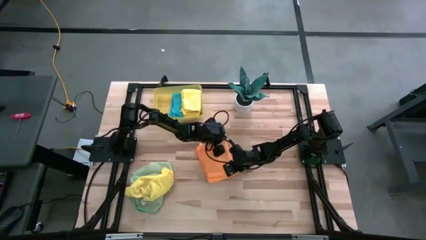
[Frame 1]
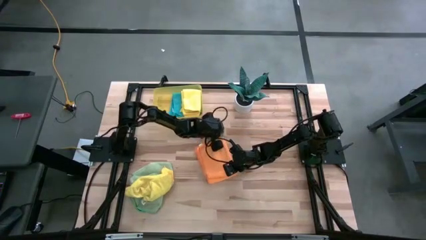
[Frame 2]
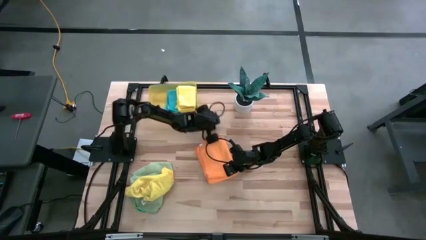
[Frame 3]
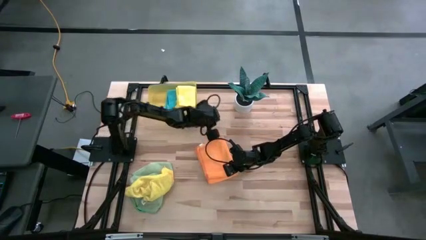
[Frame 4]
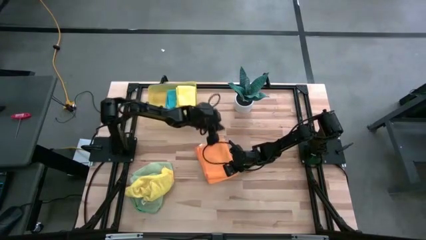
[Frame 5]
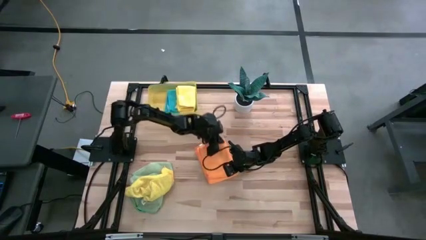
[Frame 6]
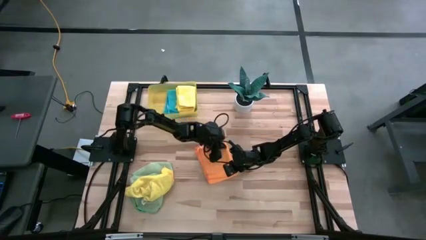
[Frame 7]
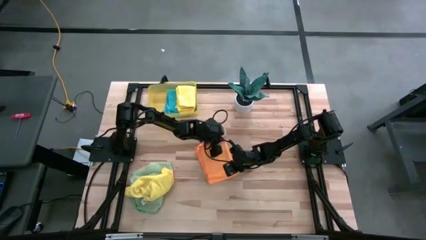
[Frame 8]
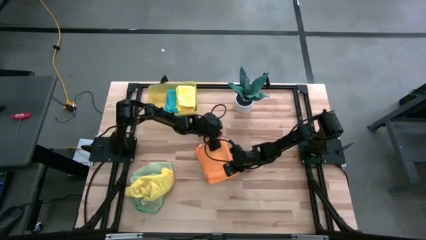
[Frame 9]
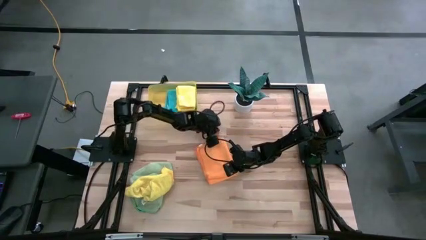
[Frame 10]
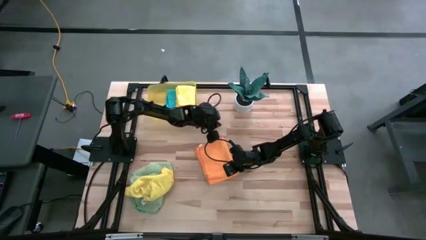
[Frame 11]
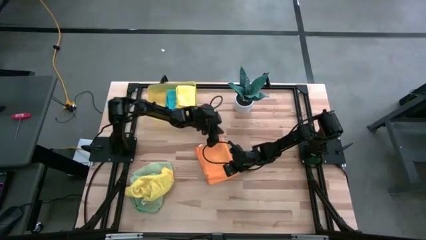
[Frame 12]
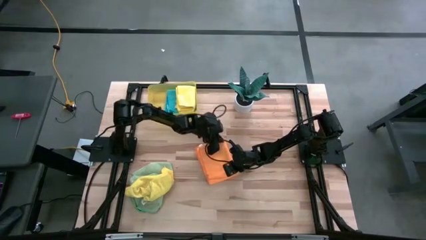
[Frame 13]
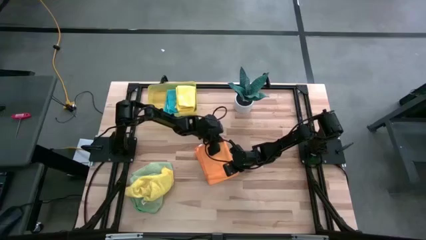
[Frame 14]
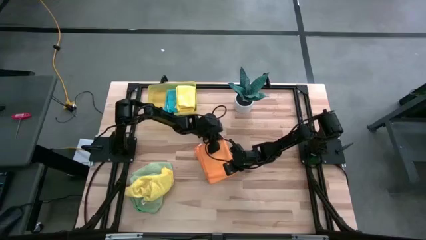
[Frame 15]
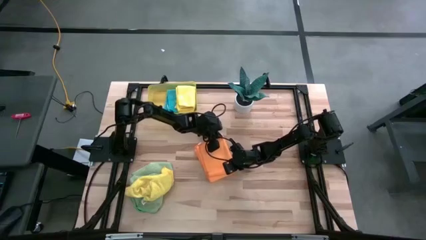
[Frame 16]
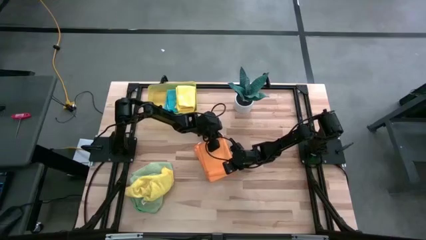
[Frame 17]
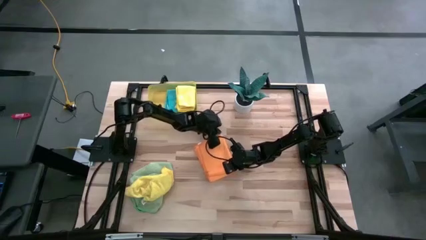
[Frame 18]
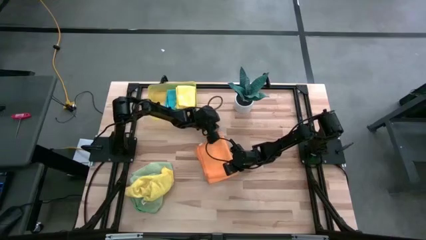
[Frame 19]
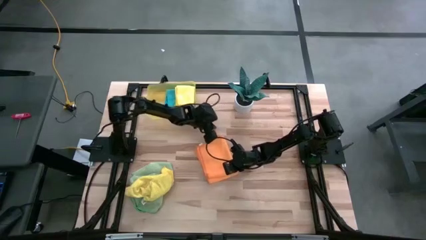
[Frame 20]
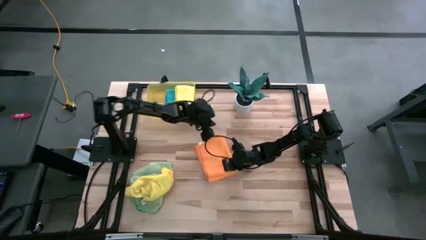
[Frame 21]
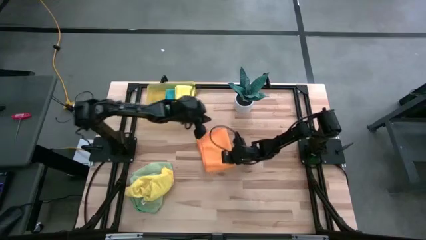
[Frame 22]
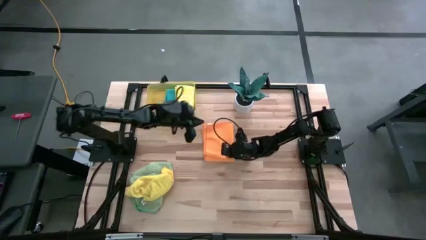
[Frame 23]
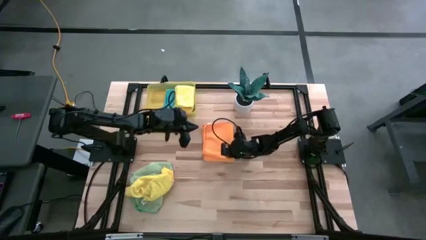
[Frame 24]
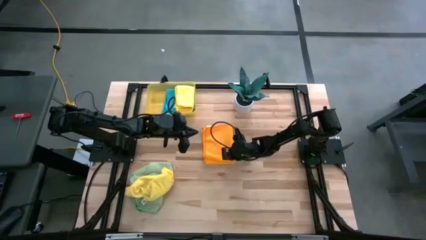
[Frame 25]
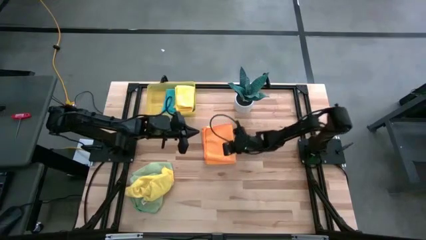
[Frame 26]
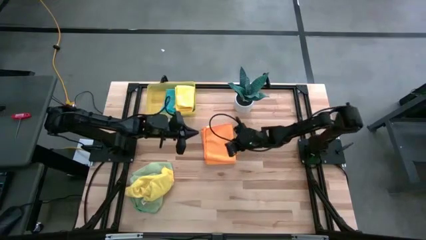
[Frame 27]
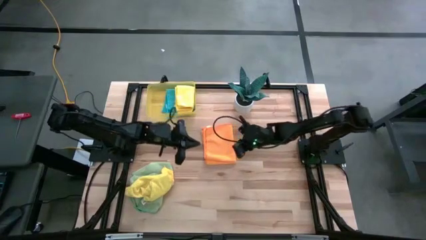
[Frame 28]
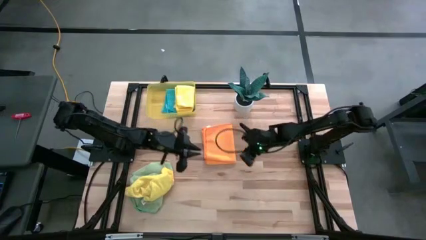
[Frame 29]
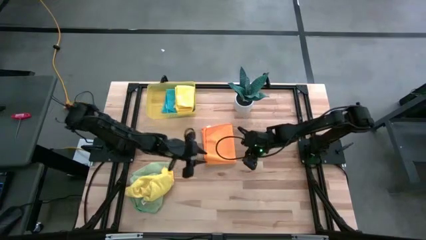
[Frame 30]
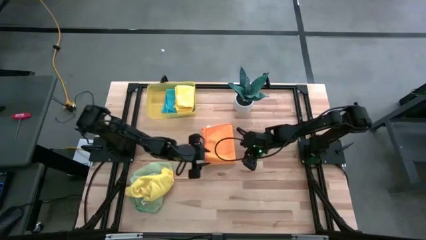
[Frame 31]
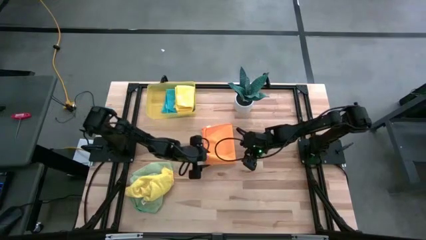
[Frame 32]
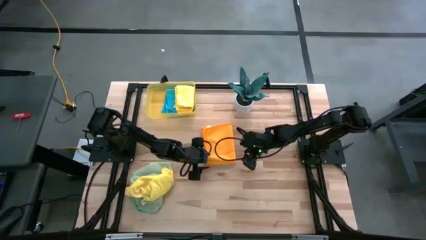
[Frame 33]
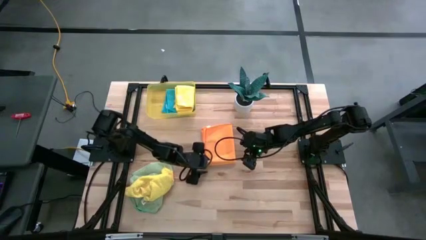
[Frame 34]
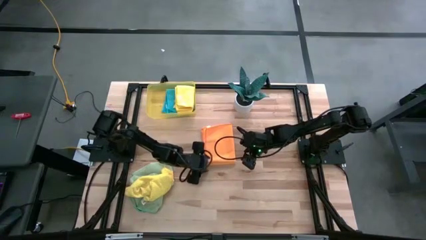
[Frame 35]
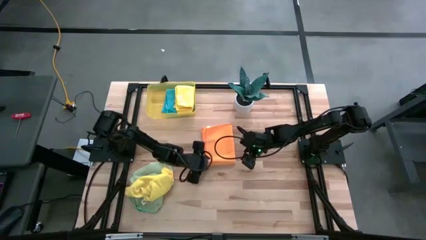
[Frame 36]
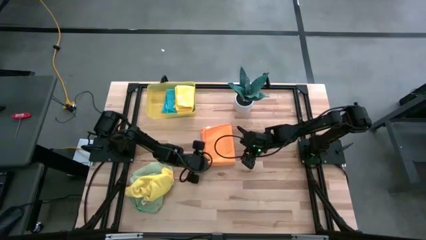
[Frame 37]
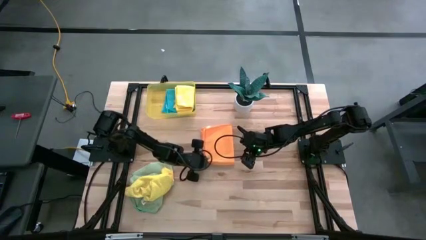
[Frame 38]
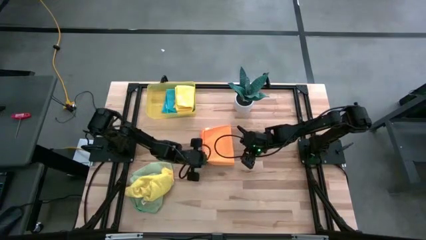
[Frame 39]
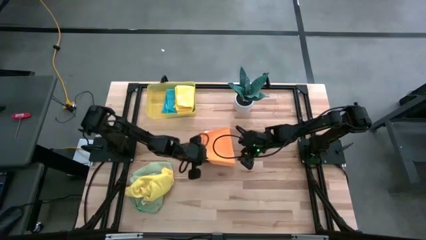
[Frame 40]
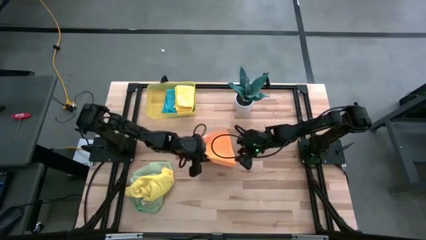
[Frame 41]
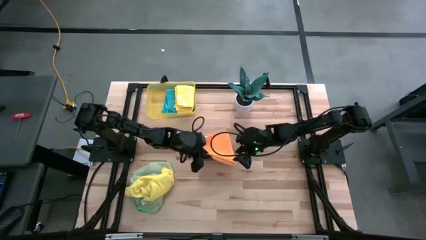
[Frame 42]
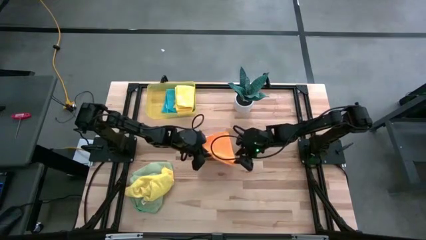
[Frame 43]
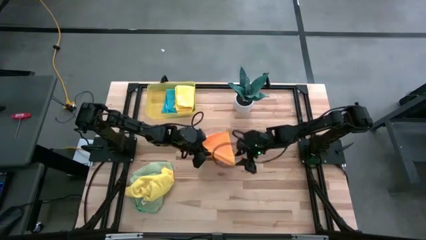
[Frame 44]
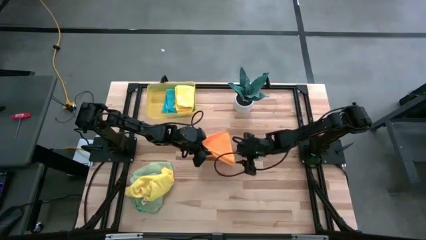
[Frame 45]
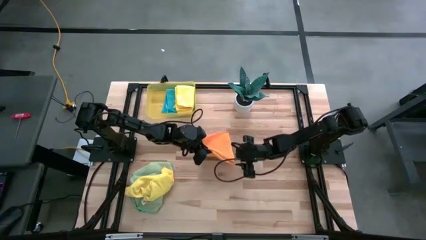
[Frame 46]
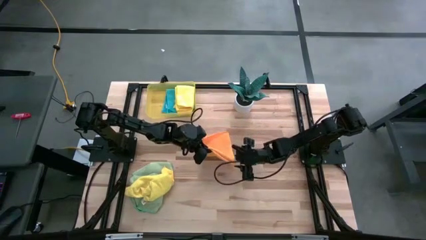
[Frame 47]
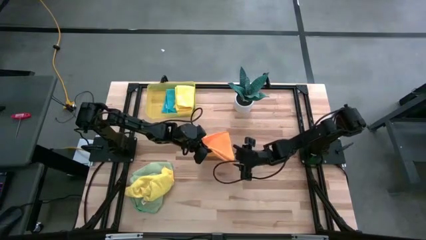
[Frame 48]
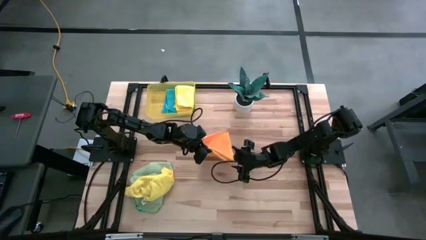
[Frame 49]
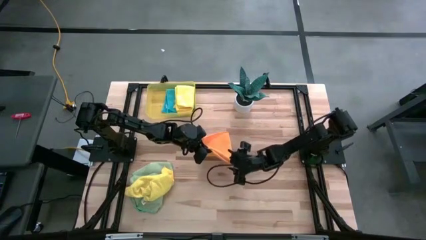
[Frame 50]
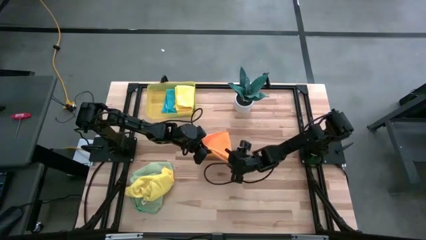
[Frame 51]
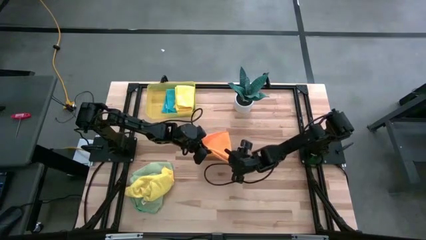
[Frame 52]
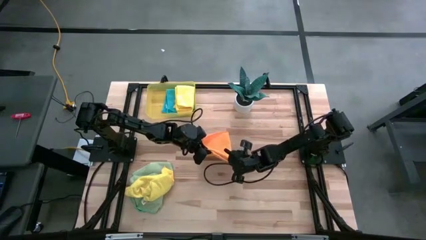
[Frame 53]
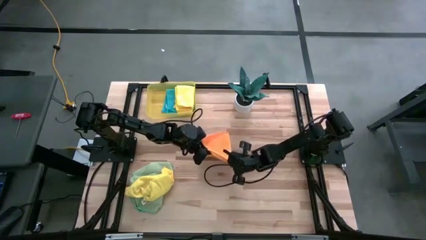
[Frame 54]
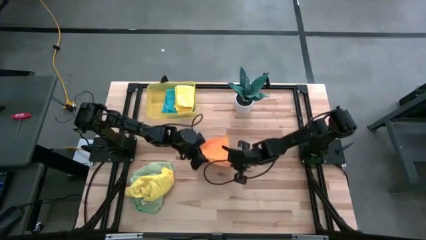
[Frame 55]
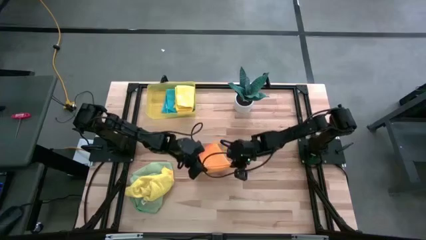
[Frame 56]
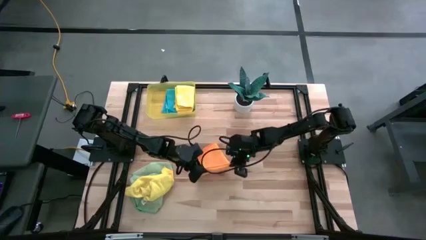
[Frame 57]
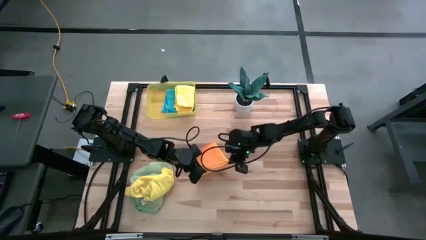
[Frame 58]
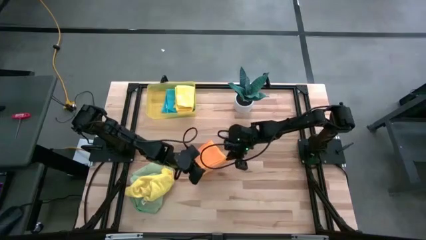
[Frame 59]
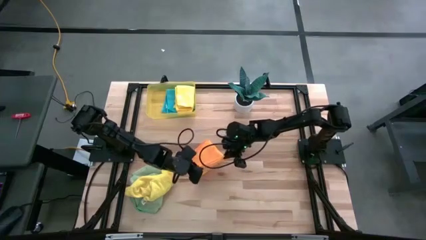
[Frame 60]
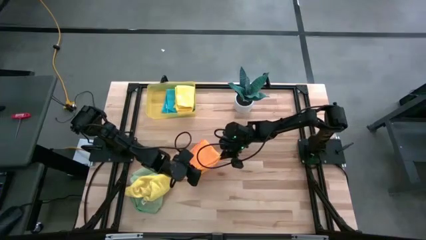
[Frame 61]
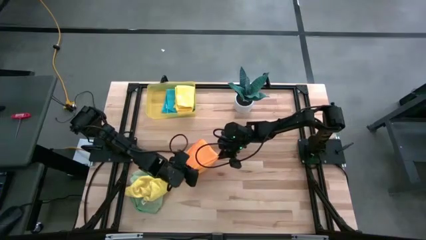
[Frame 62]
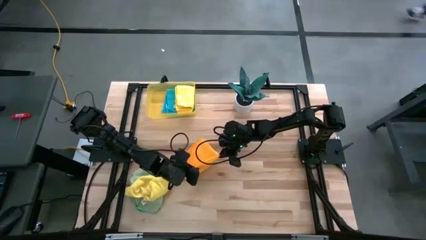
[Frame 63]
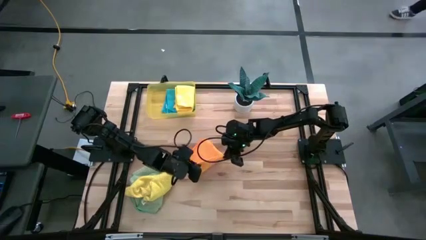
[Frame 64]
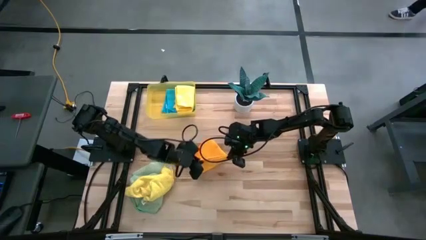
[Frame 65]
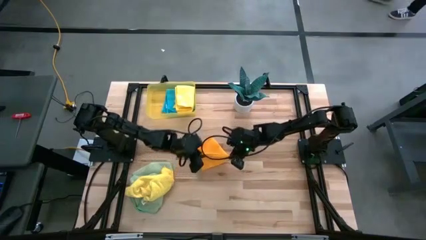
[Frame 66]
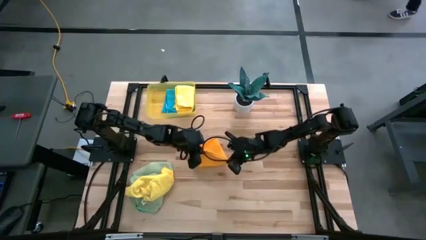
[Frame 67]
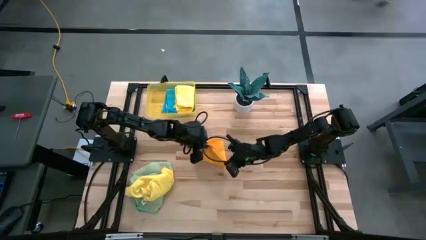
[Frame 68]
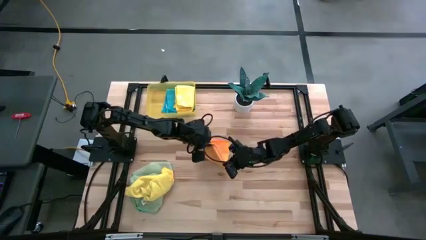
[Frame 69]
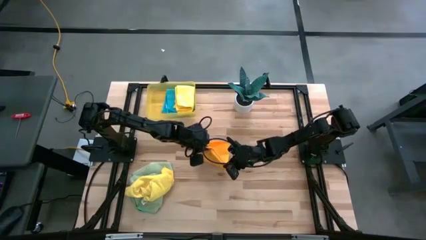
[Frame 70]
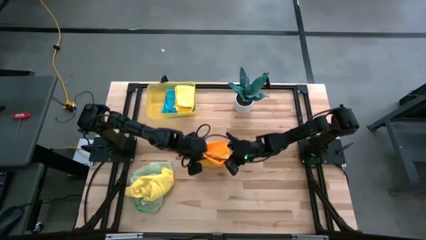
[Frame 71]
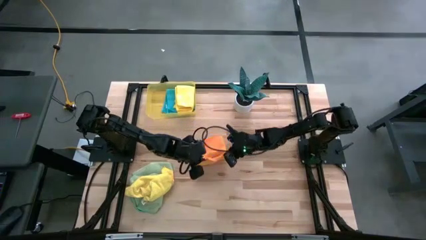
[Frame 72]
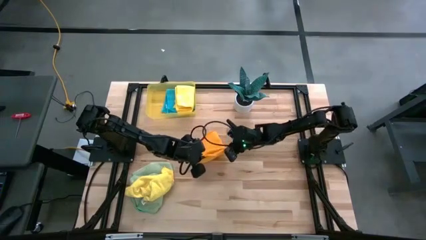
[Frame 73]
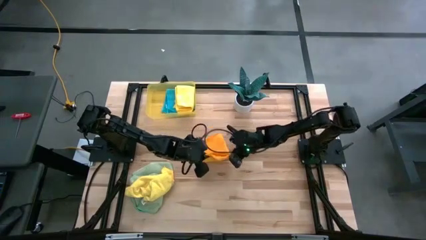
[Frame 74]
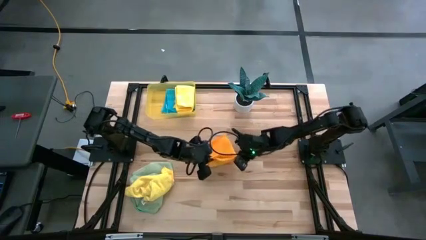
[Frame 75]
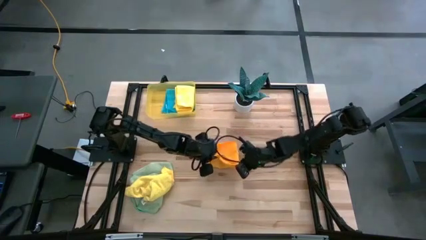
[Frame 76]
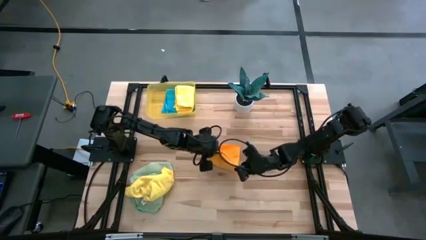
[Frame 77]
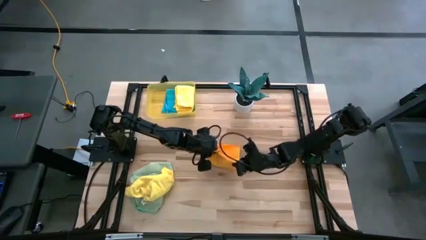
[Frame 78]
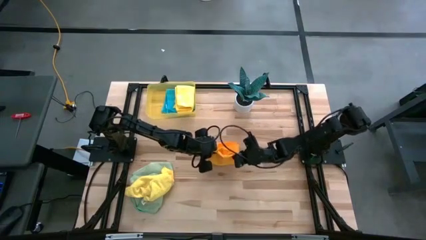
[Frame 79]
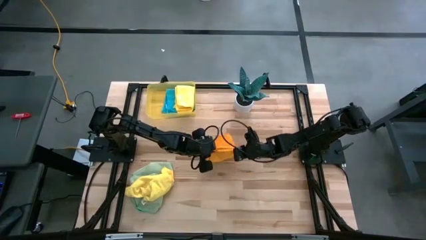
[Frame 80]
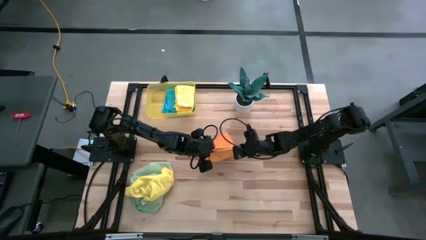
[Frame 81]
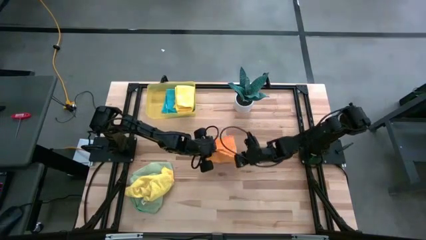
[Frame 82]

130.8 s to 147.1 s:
Task: Fold microfiber towels
Fold the orange microfiber cloth
